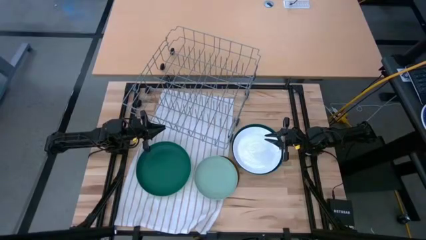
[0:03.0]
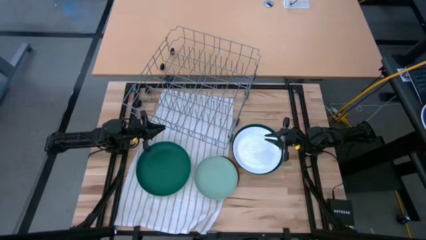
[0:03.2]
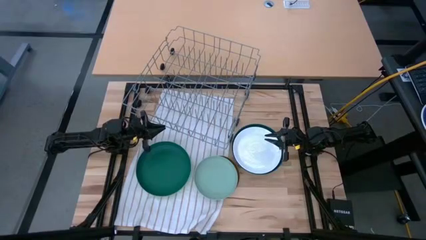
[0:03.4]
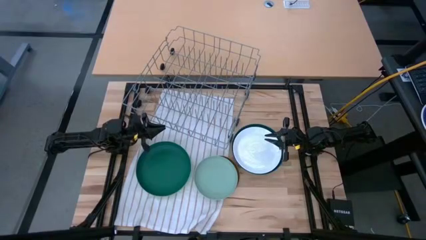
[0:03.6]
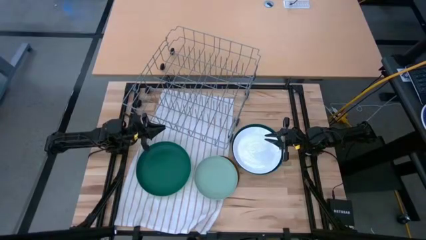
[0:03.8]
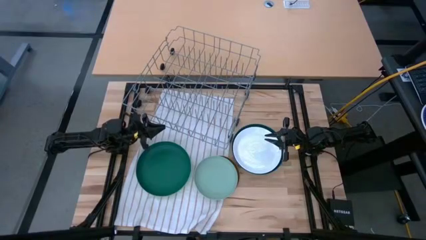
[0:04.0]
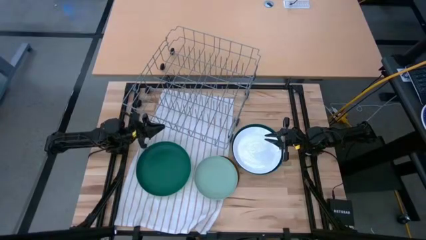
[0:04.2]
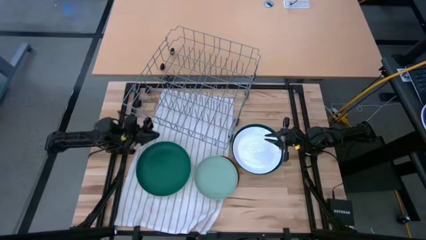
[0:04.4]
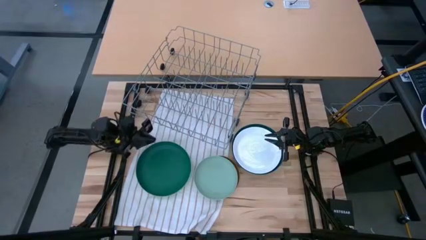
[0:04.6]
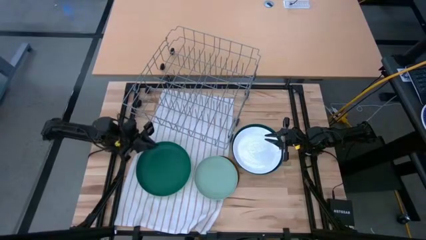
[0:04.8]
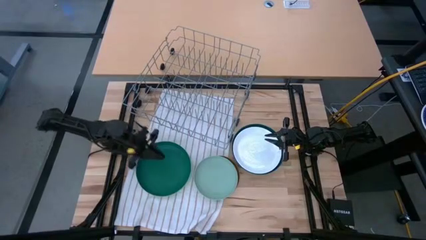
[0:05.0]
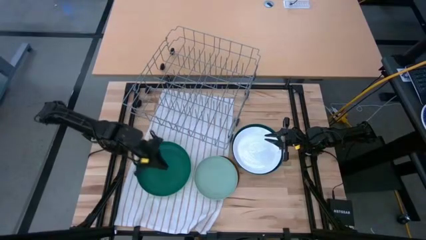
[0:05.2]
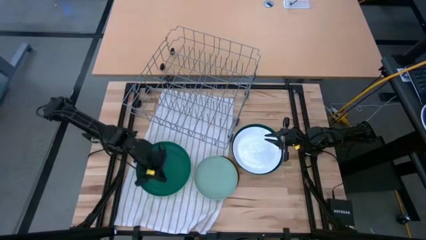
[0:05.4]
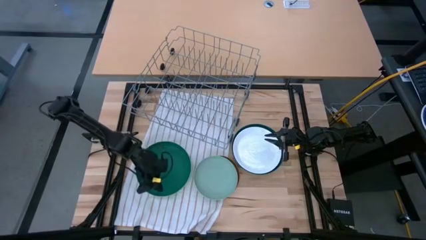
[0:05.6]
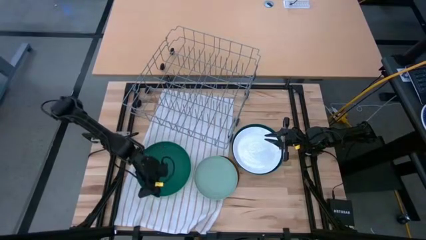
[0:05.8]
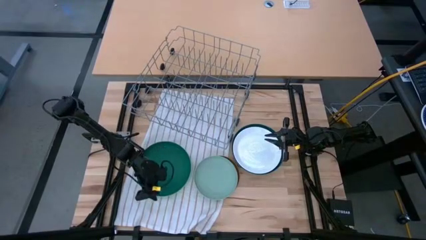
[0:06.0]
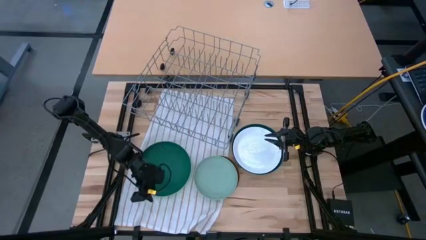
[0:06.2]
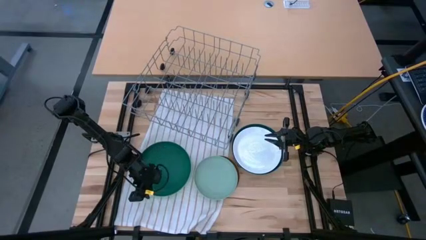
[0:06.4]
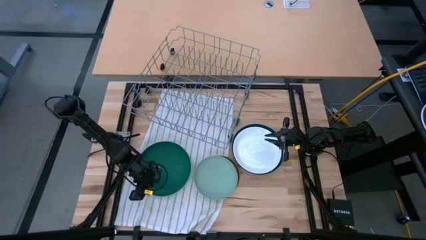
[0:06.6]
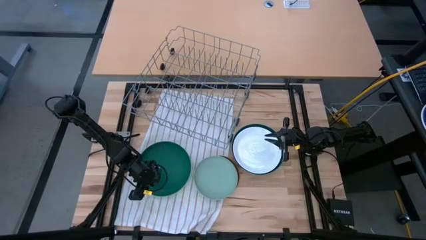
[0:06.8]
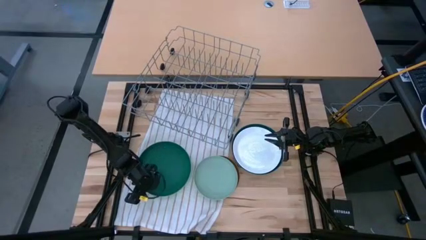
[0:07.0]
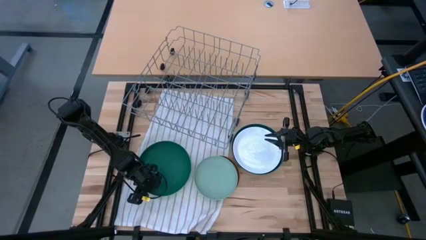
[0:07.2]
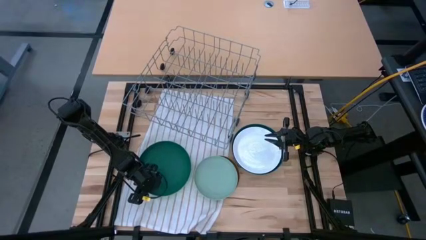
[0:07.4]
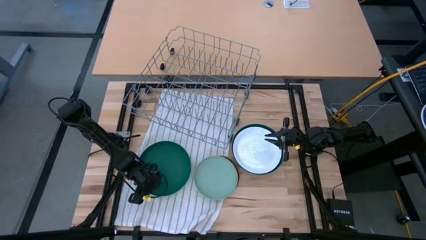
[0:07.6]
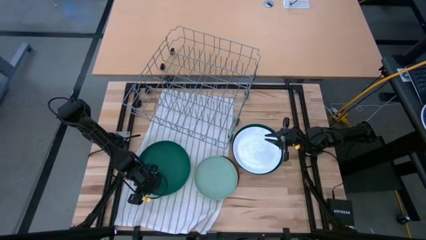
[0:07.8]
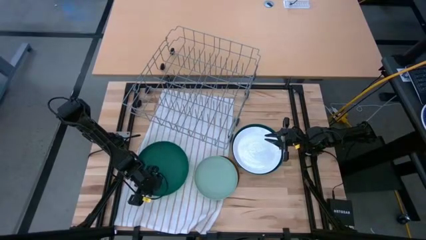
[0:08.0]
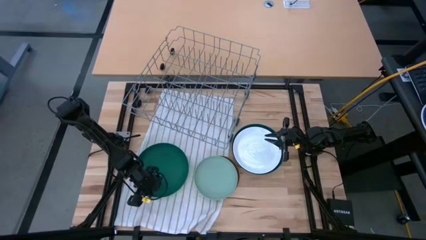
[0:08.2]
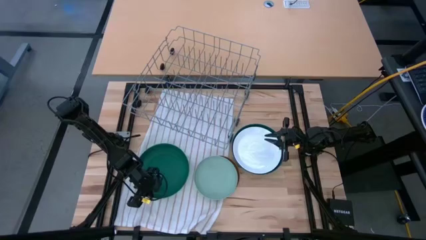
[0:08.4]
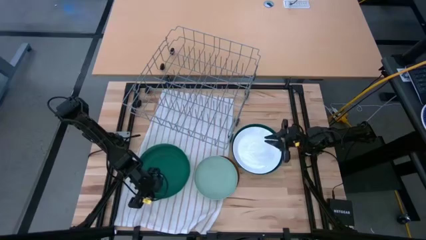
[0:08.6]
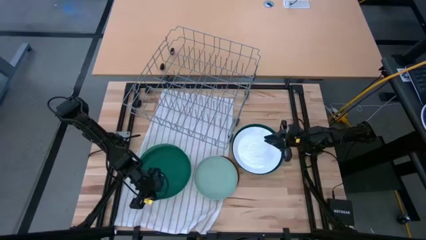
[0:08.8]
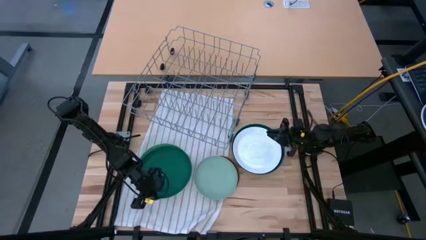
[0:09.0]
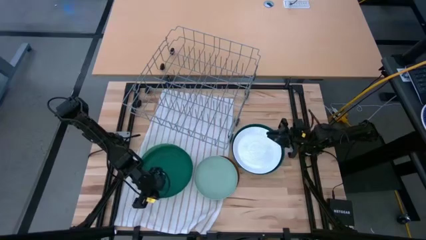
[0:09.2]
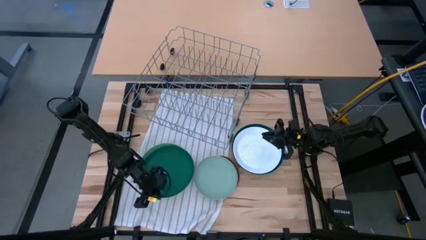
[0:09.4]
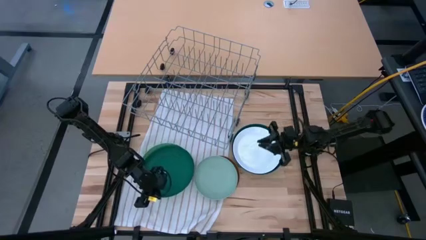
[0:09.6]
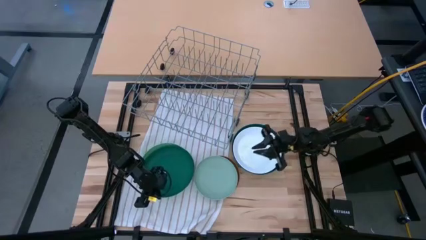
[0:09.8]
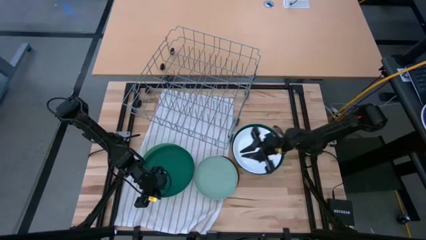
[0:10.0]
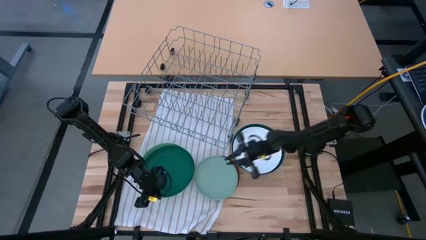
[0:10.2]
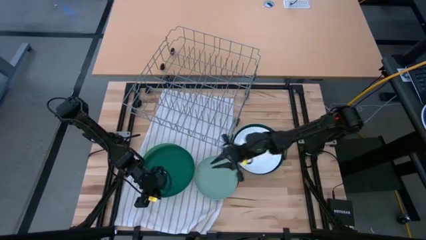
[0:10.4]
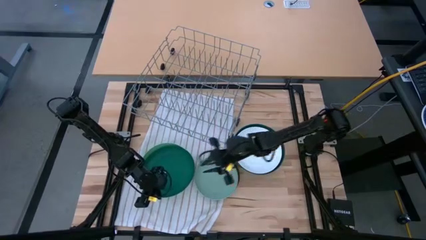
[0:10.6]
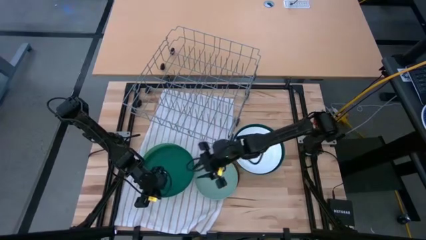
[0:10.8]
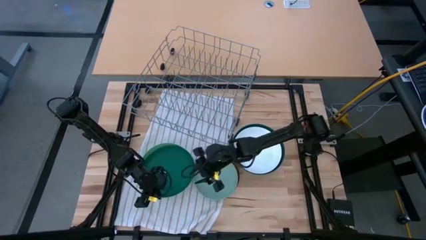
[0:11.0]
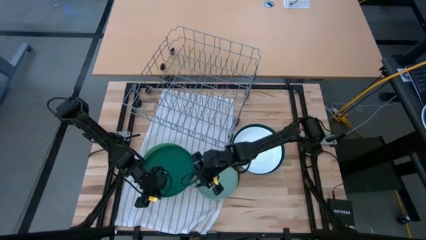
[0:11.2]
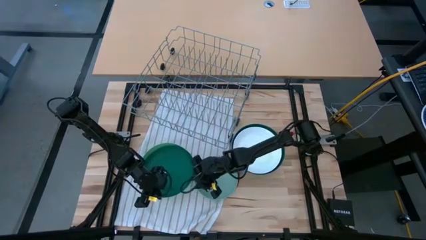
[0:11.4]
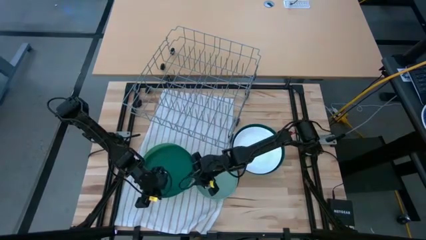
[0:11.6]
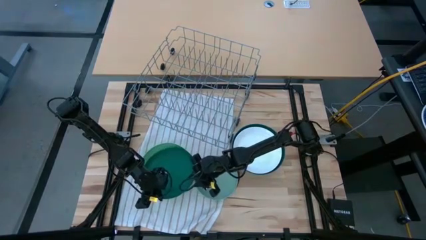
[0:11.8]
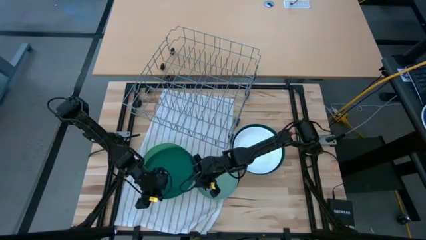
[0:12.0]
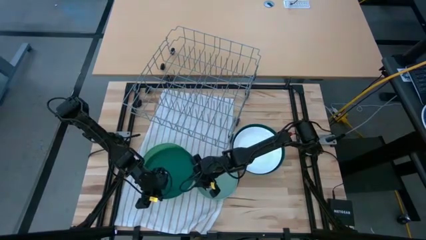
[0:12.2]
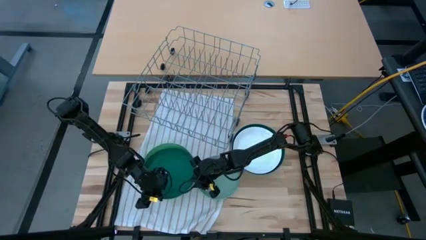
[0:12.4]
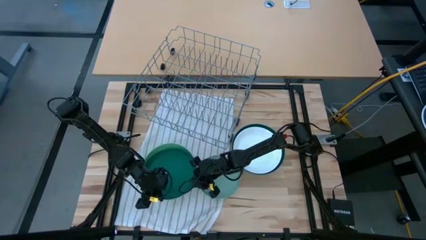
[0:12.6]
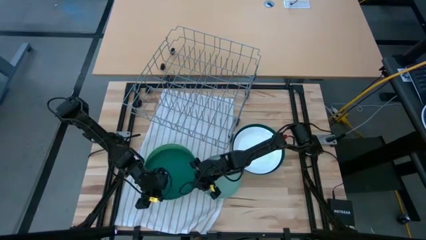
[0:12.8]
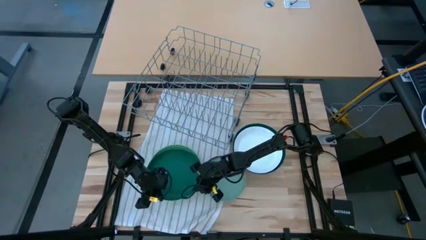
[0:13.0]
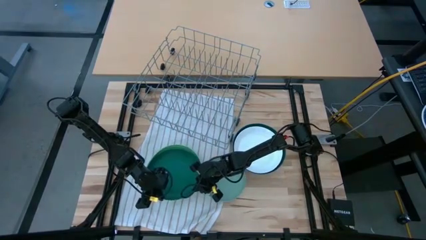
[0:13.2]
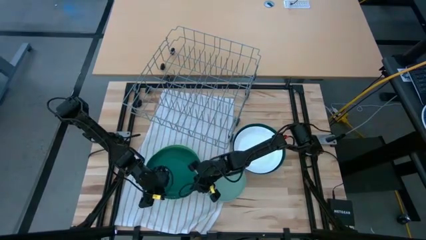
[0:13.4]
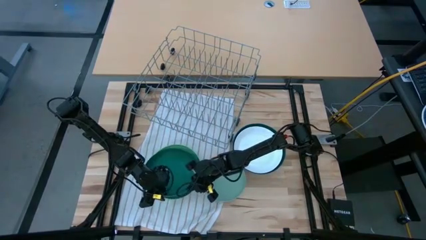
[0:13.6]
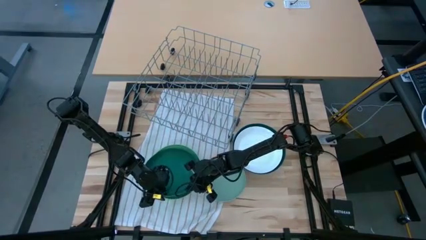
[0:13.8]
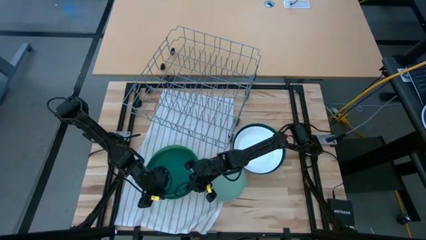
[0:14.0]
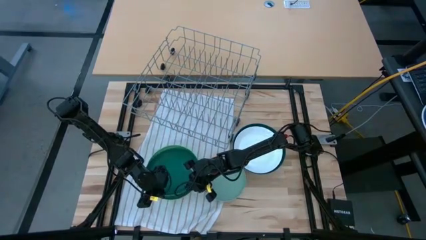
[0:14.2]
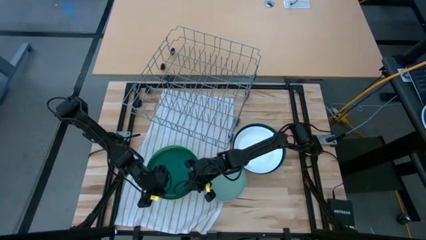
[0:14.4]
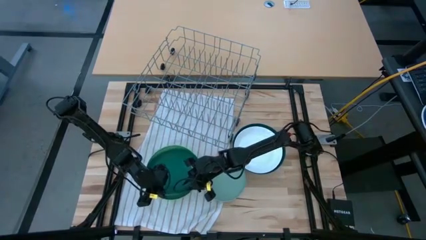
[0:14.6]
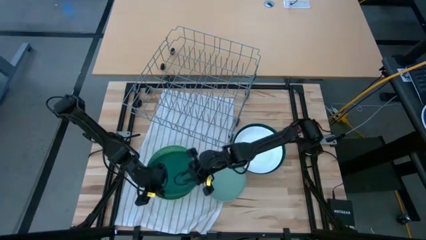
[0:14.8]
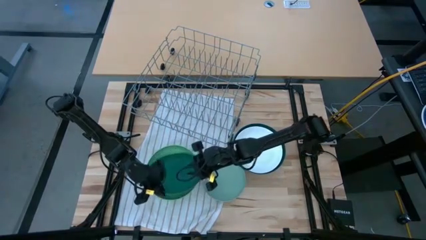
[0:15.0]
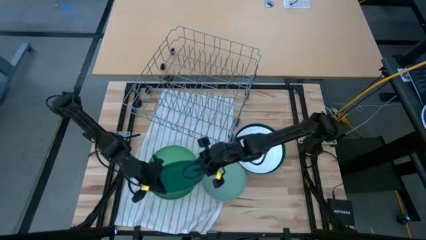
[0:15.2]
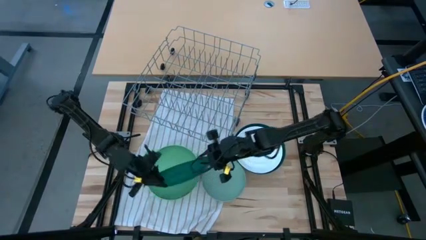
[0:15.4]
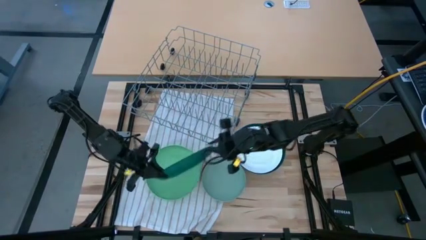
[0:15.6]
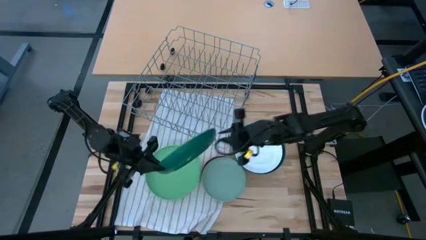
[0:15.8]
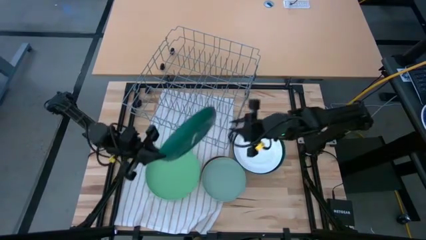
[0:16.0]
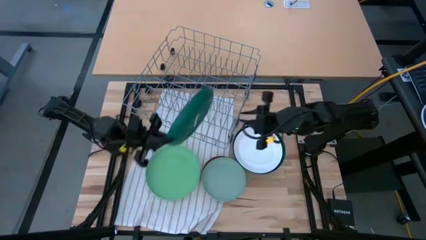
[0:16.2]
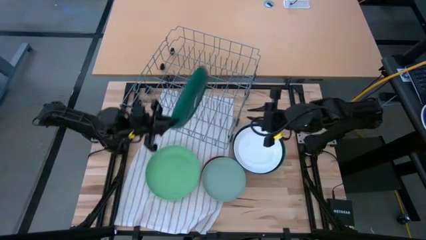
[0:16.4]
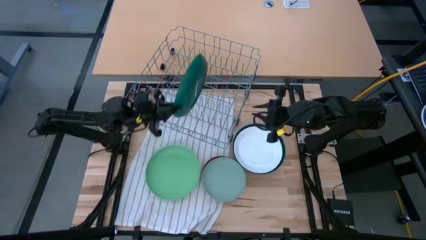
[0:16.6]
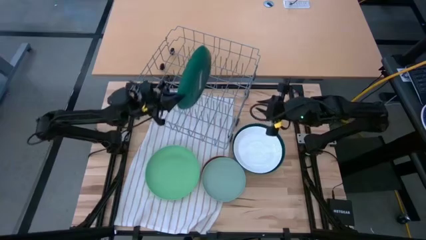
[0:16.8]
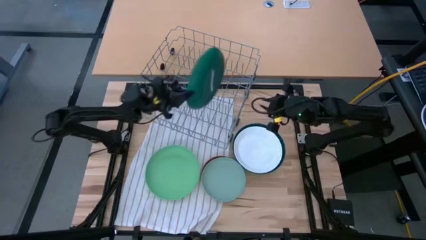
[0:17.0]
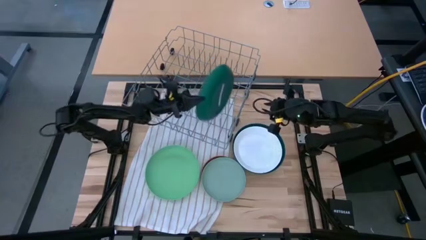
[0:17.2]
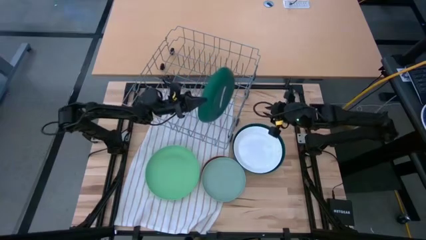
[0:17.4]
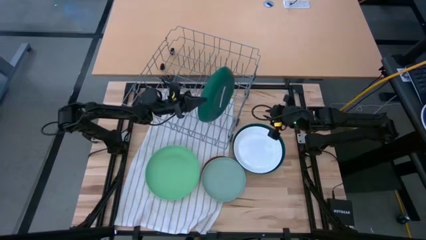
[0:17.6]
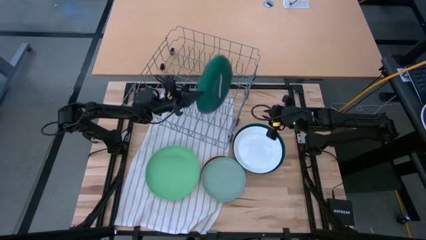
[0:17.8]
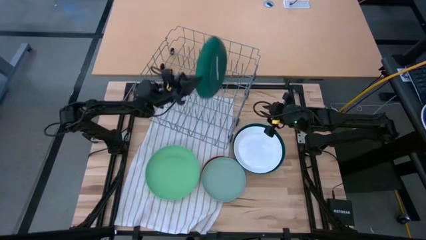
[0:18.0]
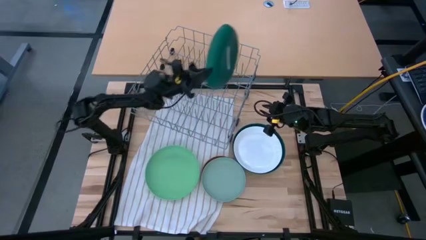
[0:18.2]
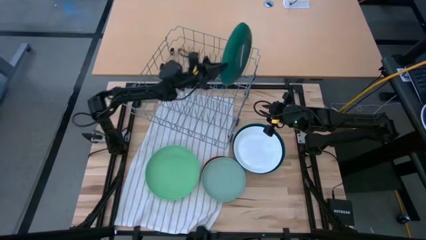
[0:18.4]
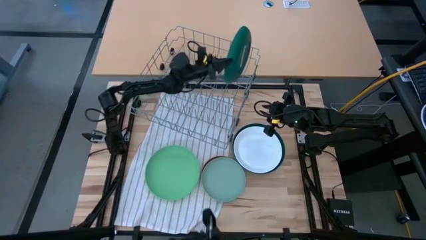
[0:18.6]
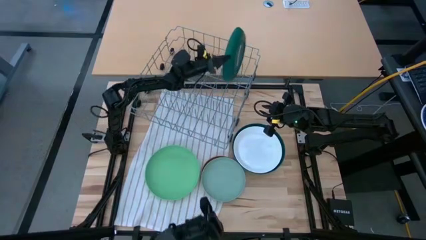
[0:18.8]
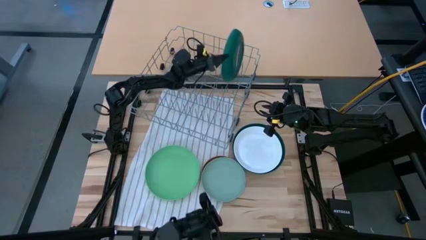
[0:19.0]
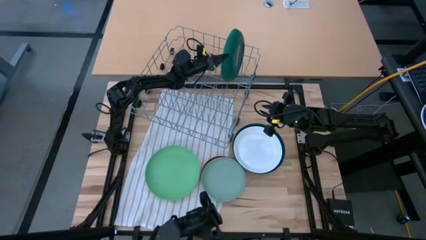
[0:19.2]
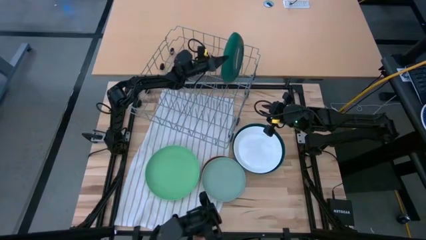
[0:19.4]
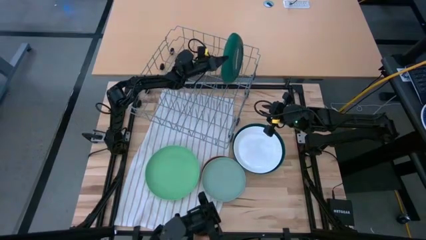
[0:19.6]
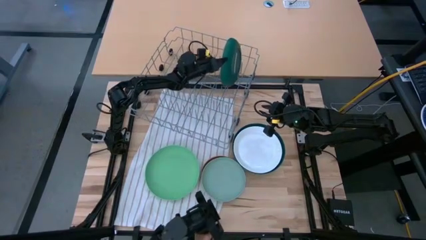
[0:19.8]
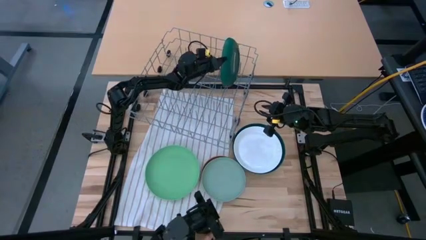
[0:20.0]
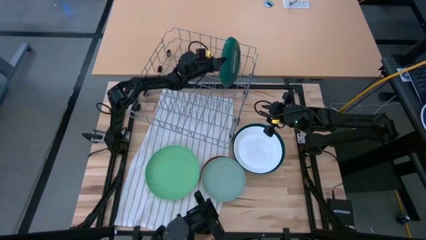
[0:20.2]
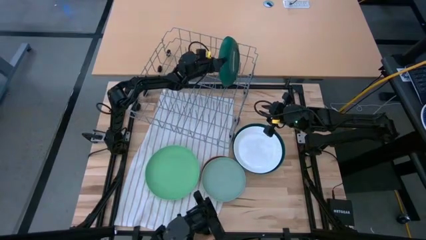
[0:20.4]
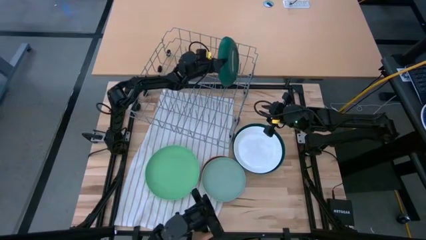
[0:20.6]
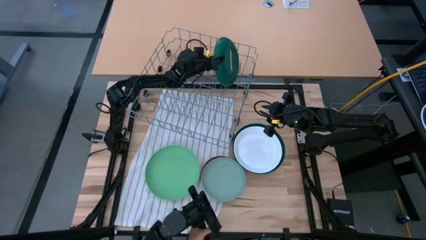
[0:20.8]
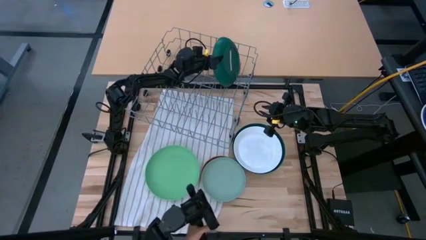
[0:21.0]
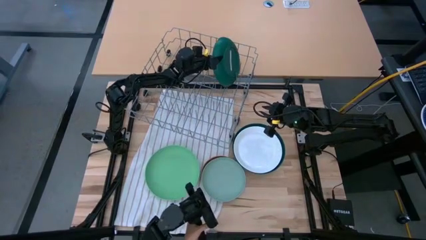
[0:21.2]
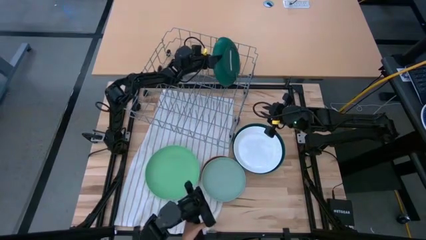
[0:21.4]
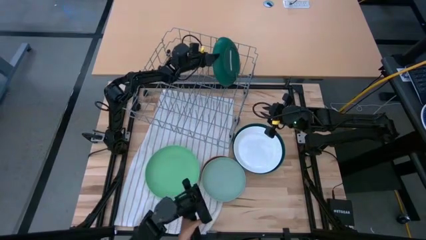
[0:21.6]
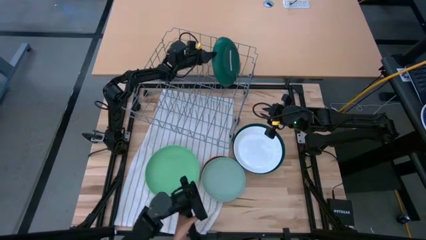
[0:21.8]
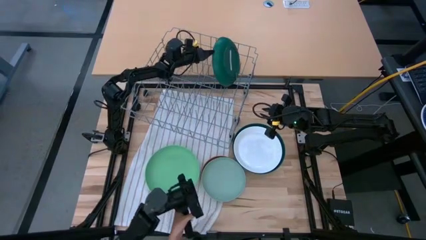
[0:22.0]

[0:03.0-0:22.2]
Task: Sort dishes
Put the dark green plate into the dishwasher rack
